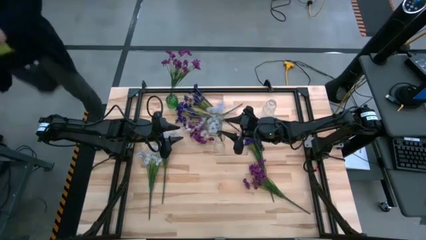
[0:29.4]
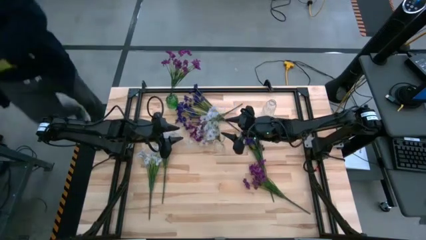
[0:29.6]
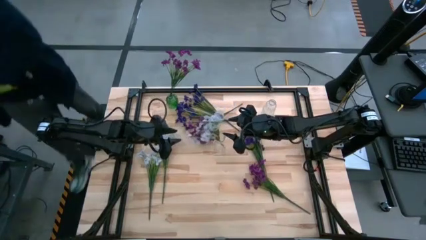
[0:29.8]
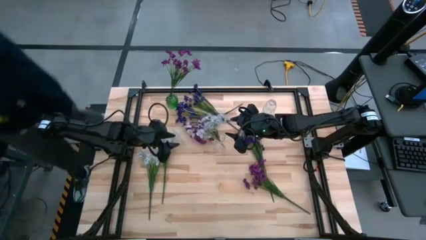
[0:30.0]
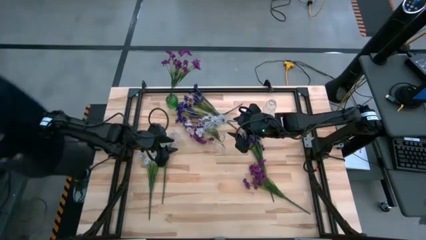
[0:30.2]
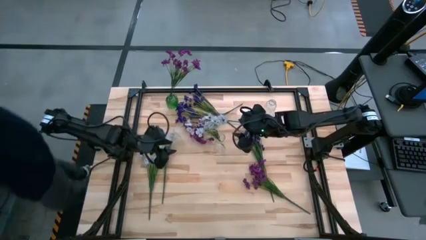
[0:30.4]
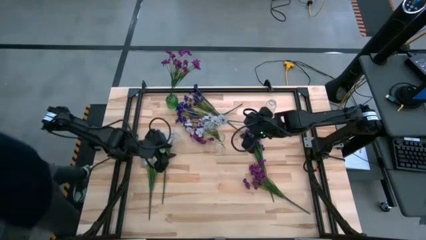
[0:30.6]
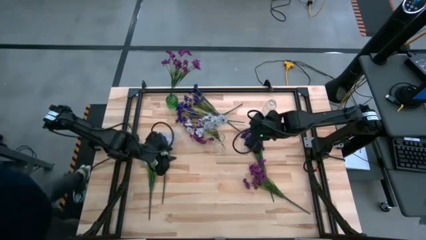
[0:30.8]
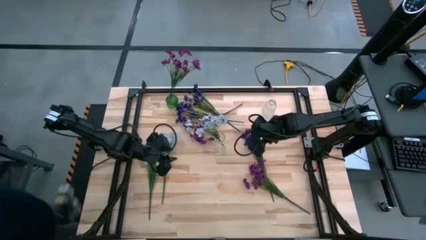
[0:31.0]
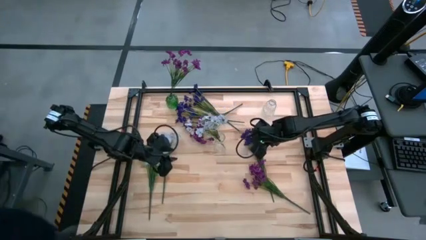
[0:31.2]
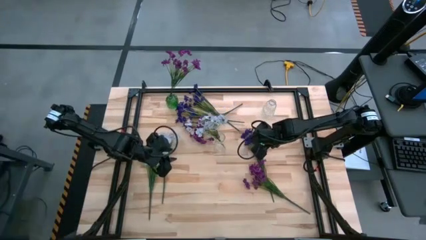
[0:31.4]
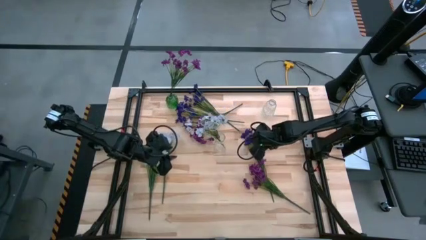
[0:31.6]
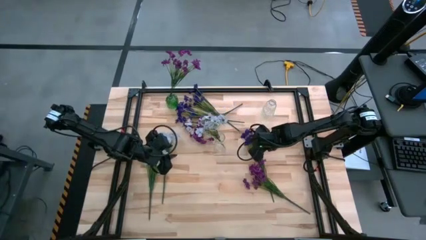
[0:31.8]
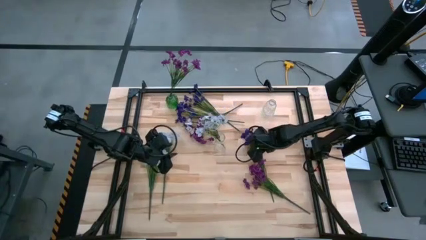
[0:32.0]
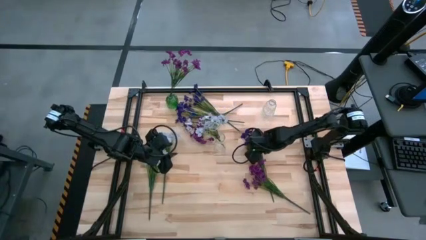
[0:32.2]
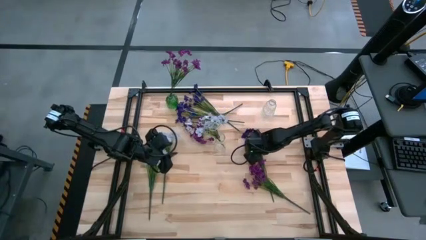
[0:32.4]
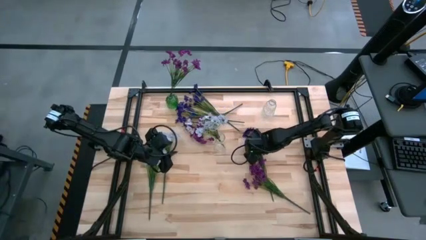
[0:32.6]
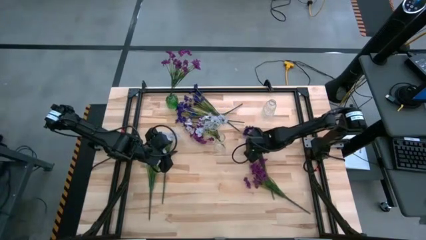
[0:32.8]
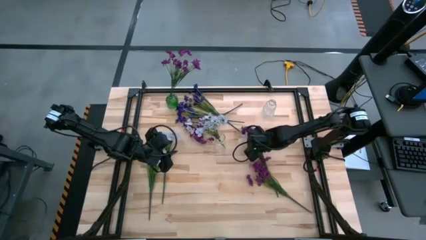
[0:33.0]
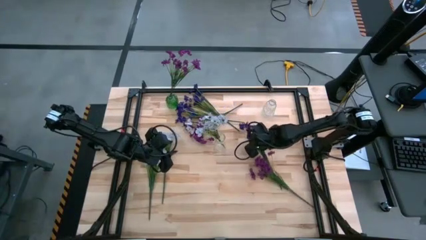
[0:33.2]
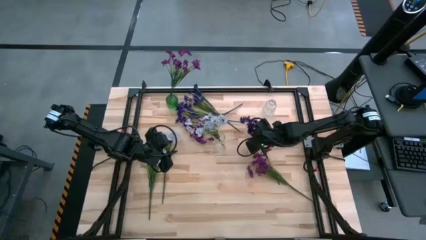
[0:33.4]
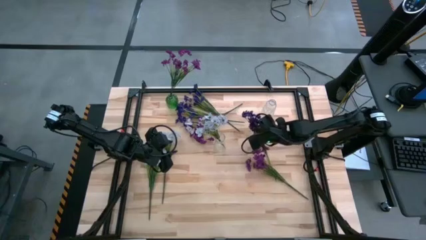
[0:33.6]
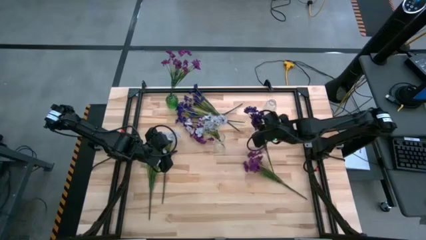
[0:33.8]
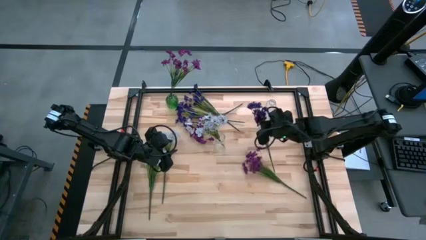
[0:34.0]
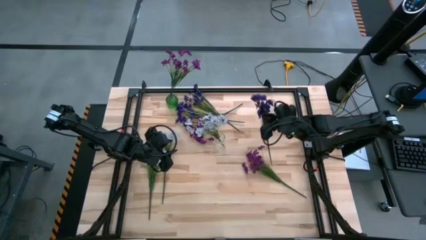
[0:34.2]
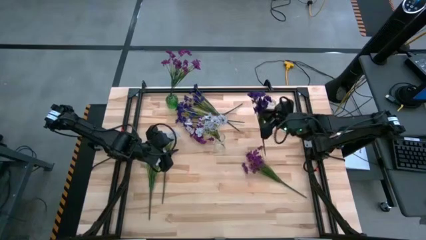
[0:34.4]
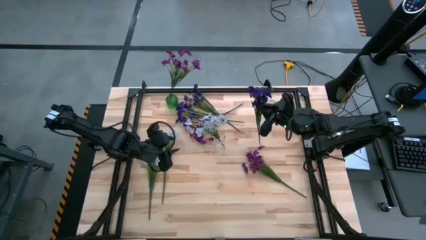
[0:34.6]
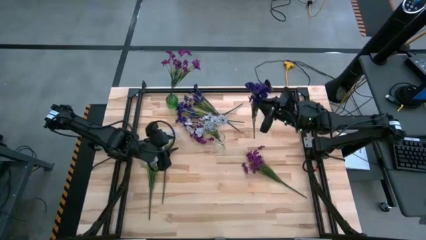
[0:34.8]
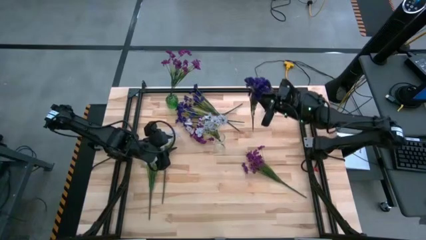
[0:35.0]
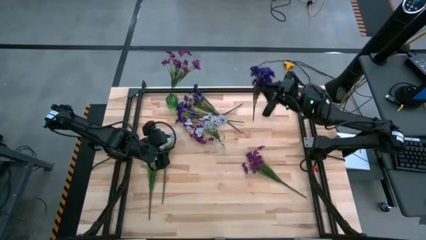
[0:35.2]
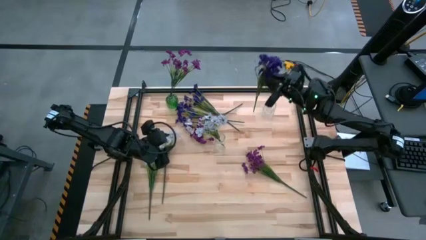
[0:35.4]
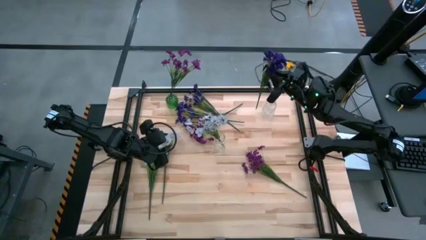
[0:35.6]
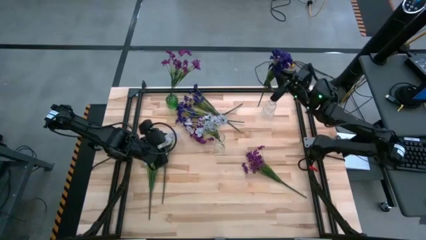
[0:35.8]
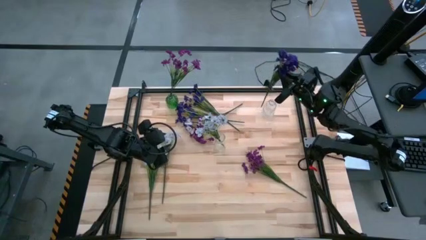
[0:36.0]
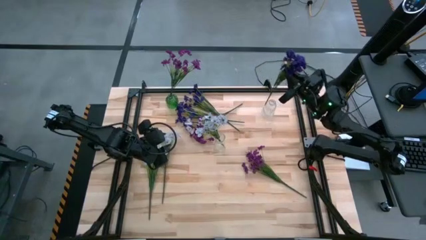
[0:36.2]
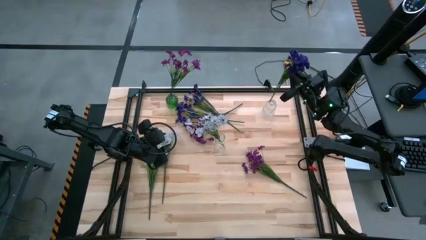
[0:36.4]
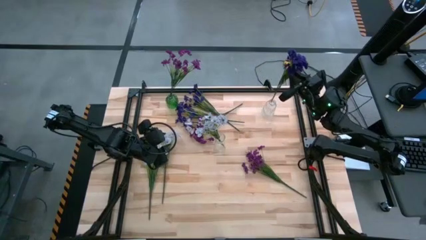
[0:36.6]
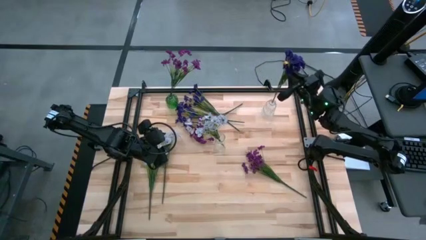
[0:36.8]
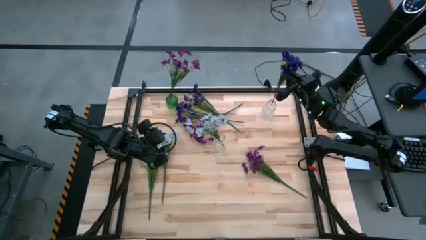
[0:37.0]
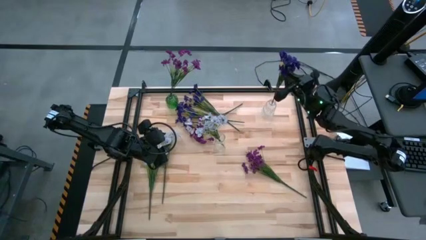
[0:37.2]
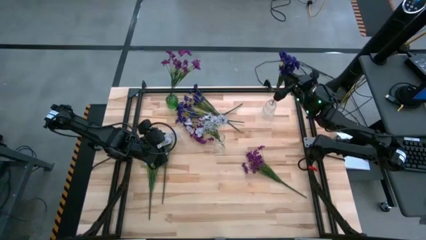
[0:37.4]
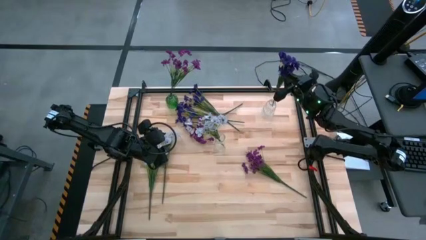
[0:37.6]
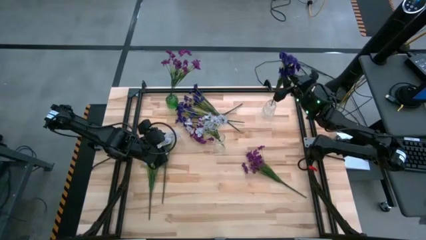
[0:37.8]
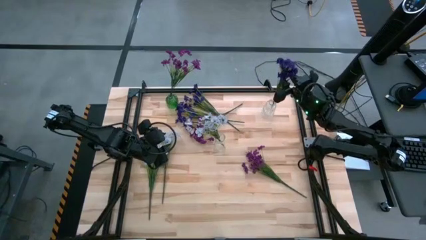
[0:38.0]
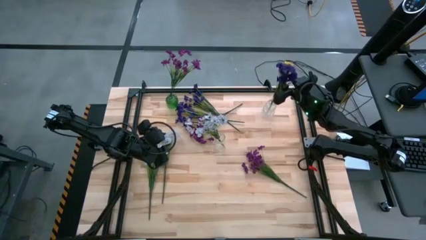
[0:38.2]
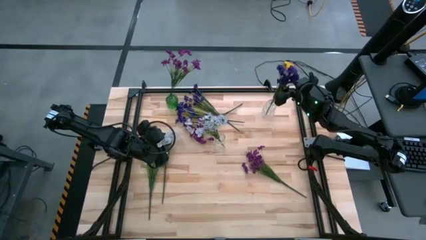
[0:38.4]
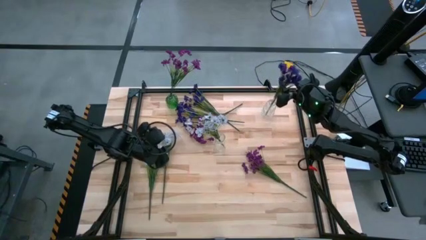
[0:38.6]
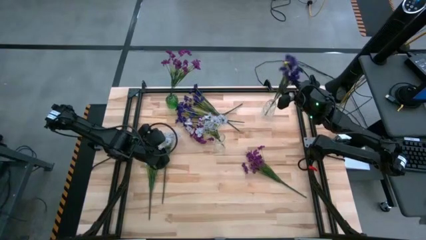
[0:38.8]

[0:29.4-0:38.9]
Task: Sort flowers into vase by color
Put the bottom blue flowers into the top transparent flower vase
